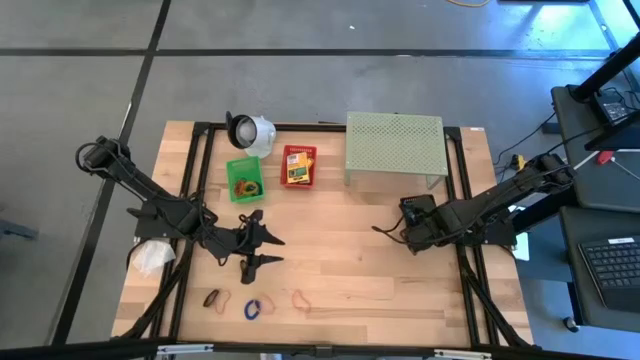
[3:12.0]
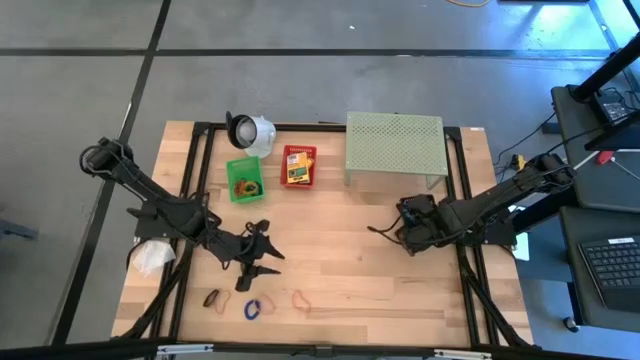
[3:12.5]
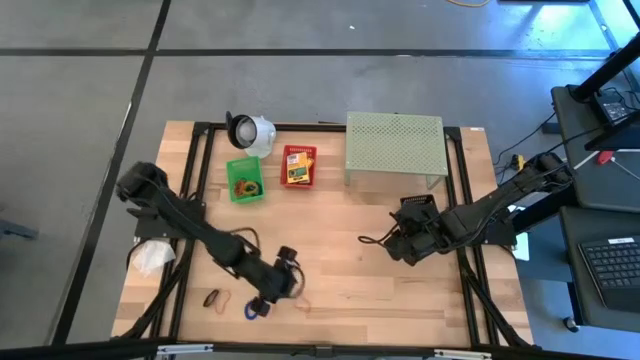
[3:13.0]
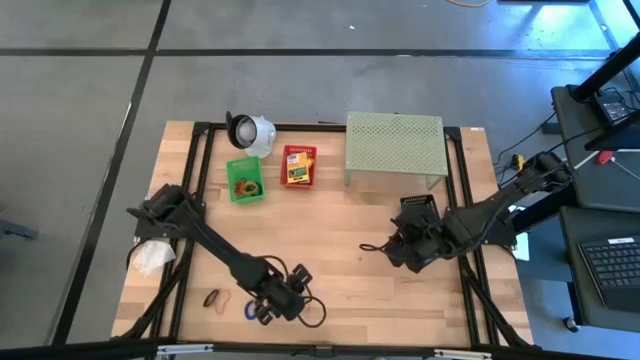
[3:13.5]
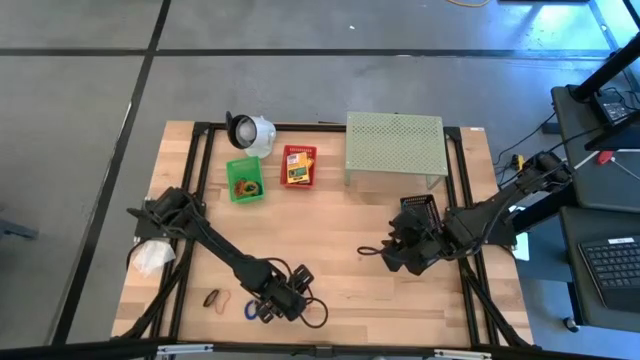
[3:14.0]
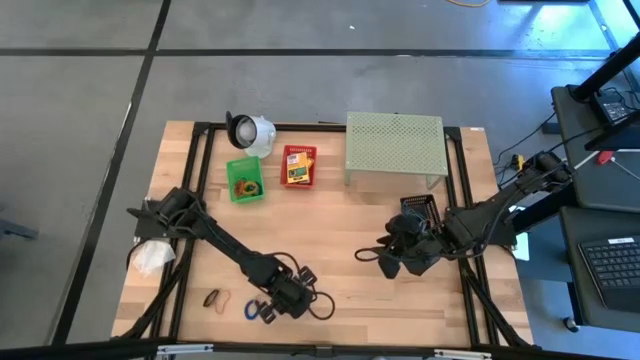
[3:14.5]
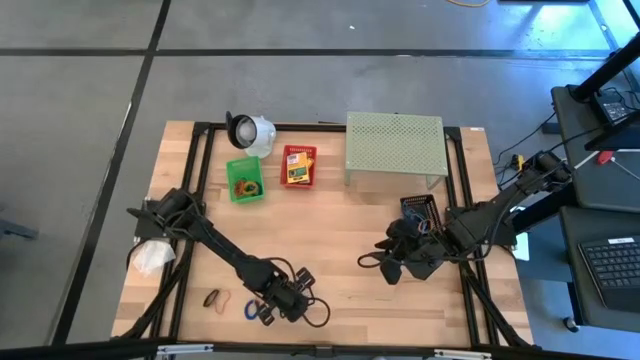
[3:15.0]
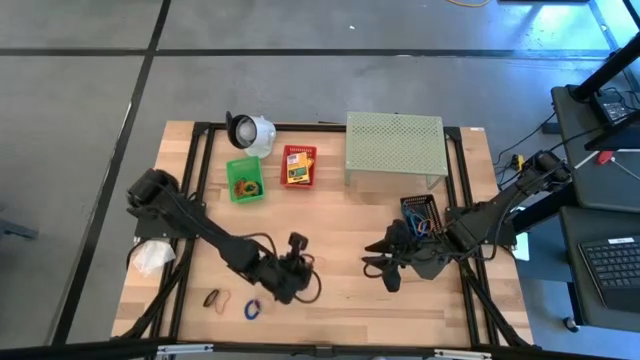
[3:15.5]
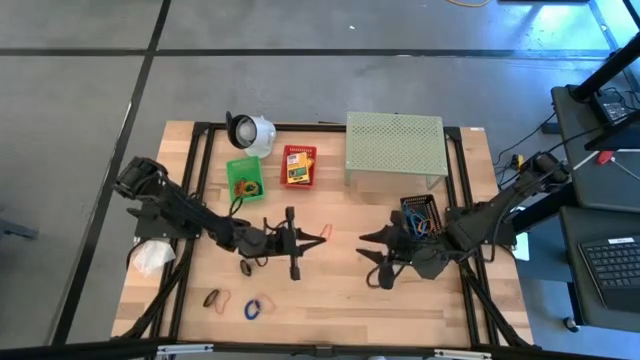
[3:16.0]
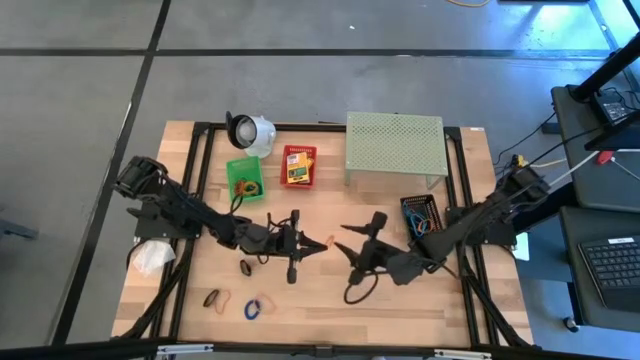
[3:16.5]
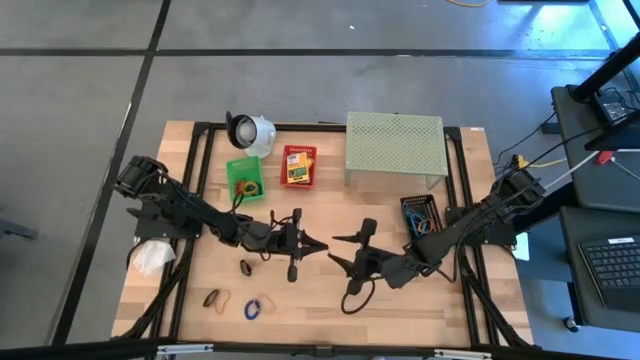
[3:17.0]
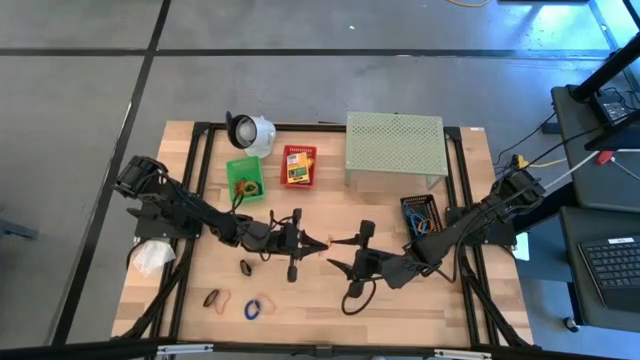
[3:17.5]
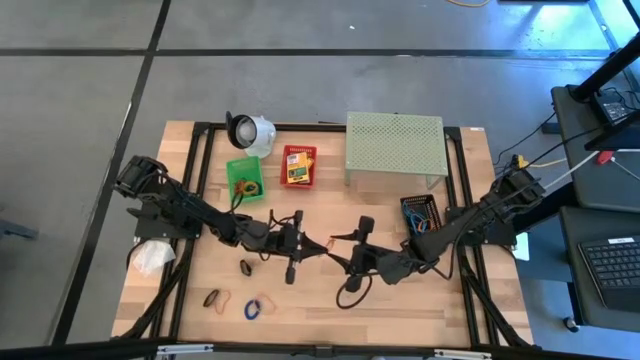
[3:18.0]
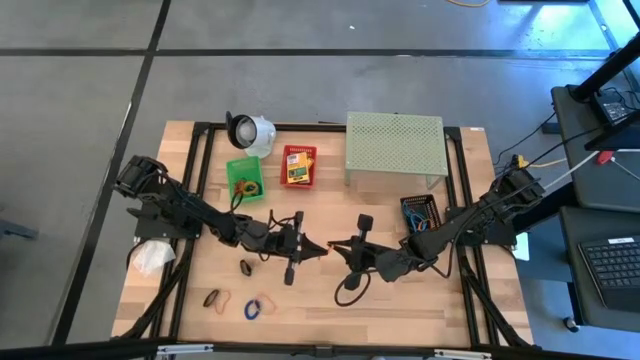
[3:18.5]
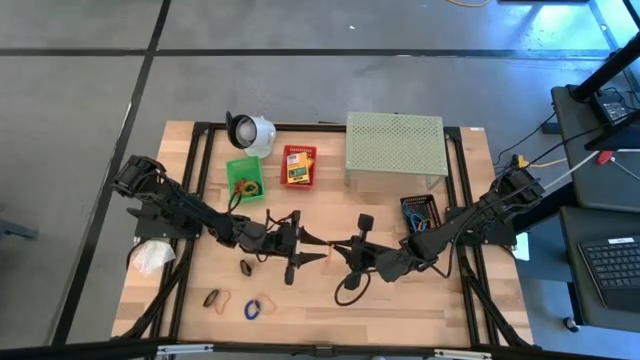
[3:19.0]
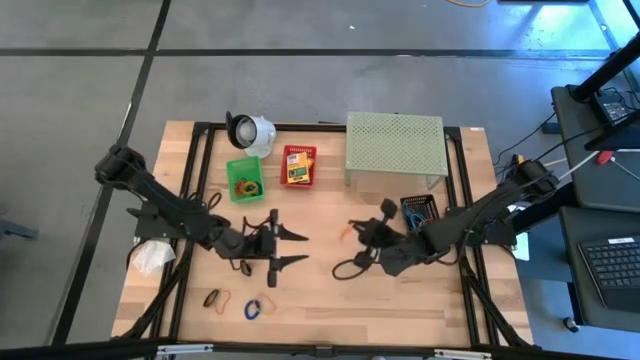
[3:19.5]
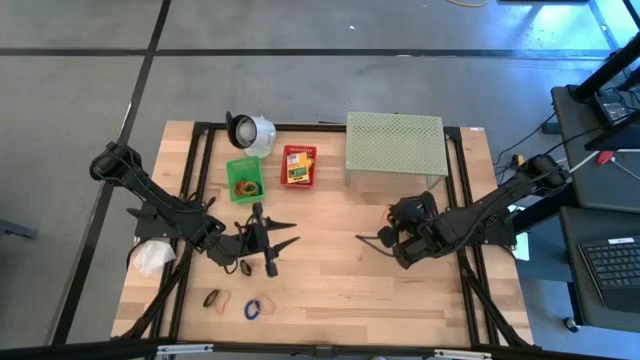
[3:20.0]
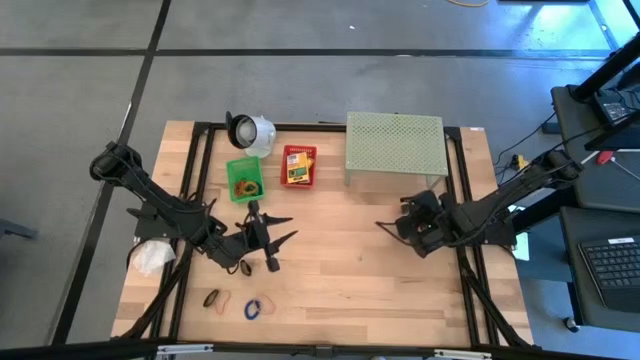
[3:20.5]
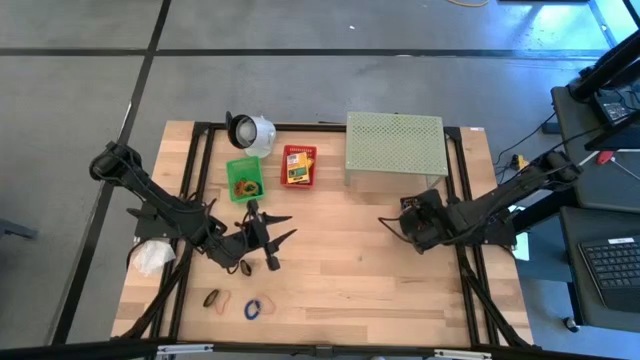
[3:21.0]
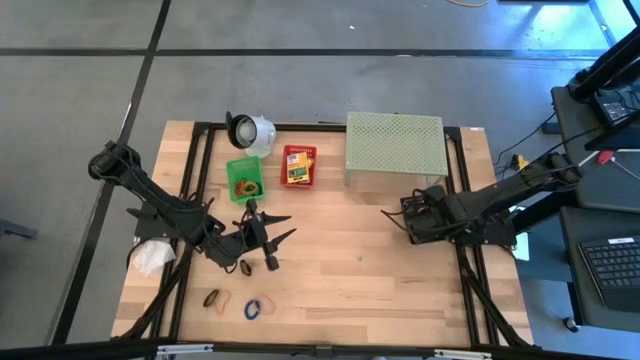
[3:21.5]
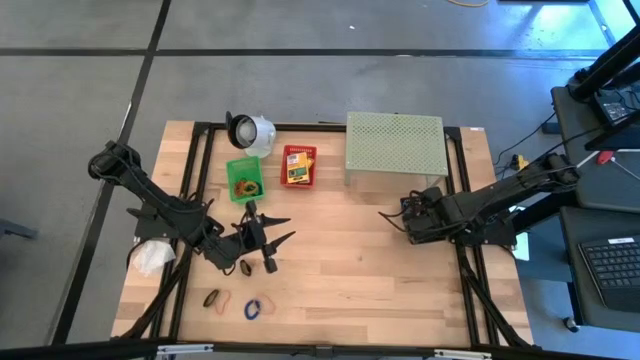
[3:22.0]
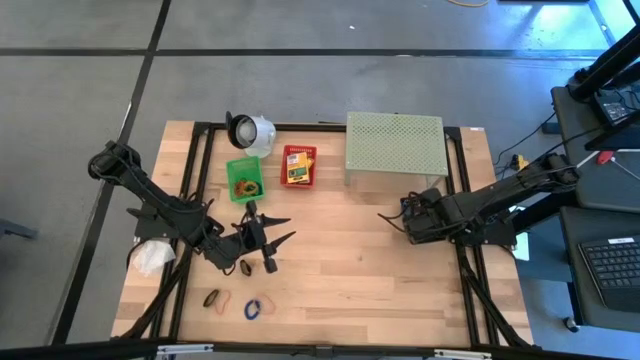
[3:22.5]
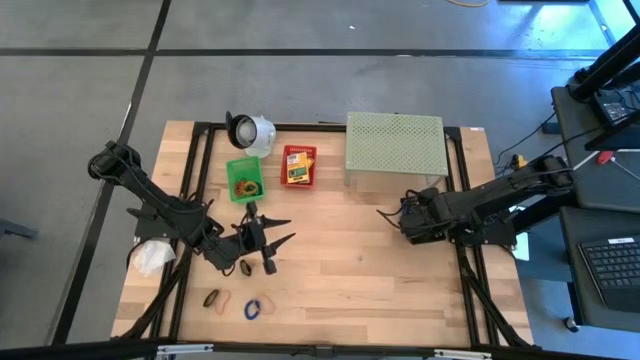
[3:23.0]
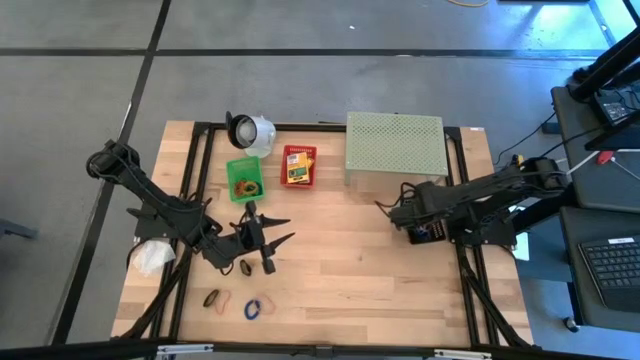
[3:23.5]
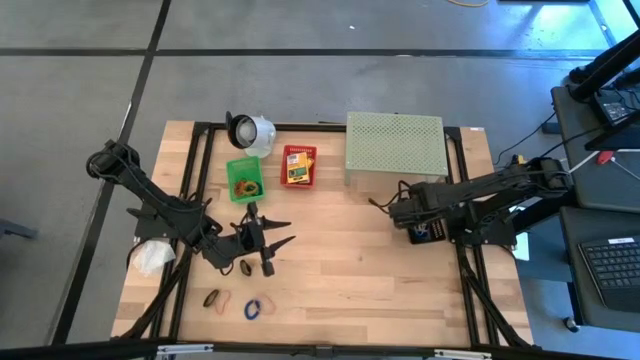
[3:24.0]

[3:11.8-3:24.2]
Task: Pick & Place Office Desk Supplies
Put the orange rubber band into the black basket

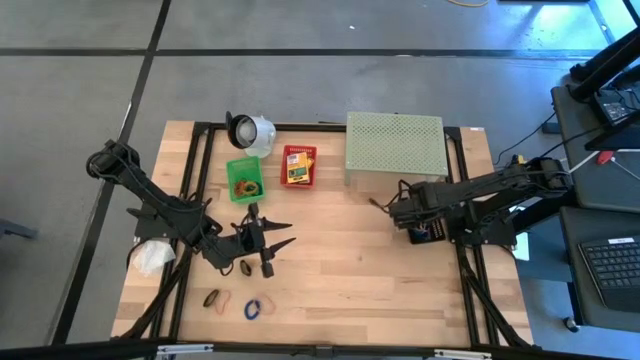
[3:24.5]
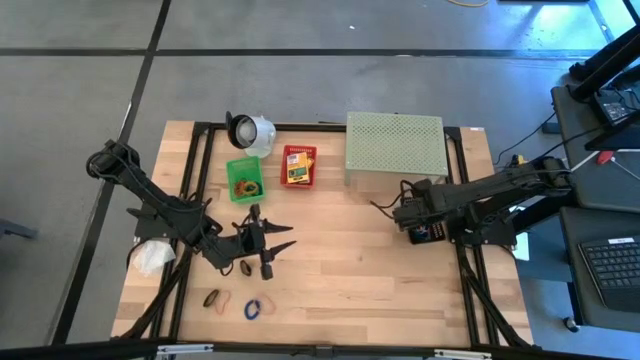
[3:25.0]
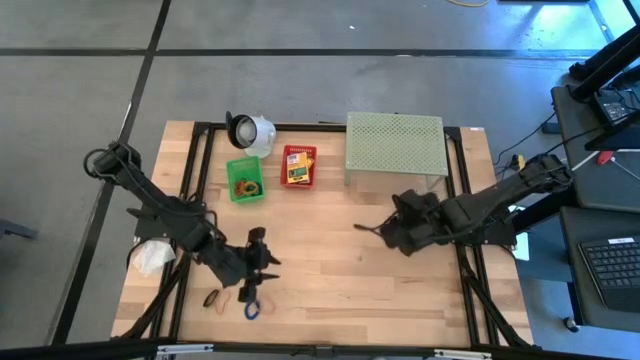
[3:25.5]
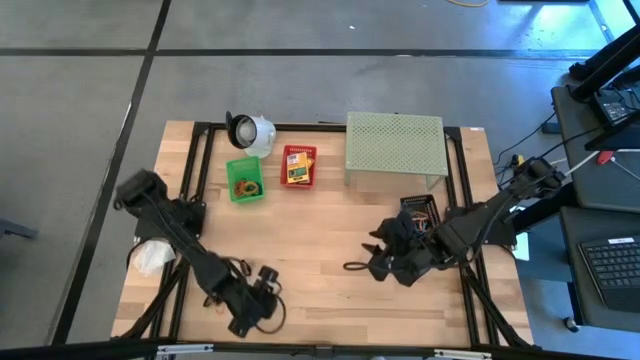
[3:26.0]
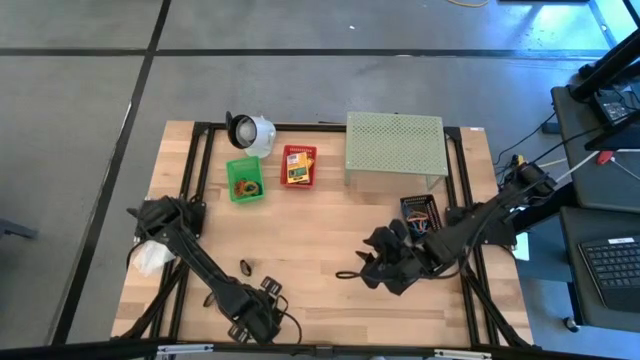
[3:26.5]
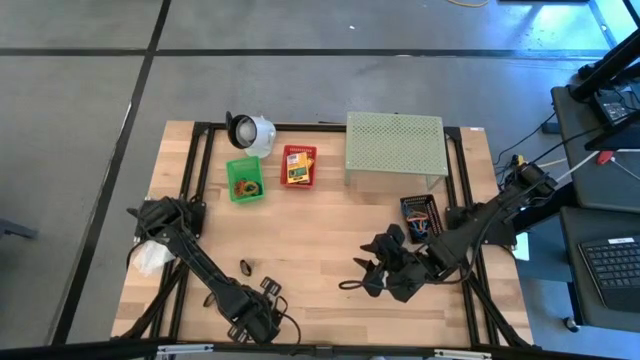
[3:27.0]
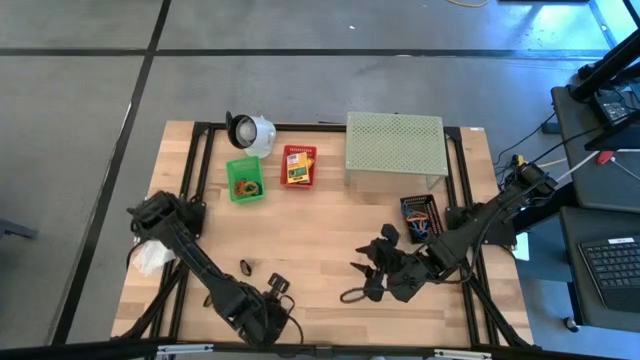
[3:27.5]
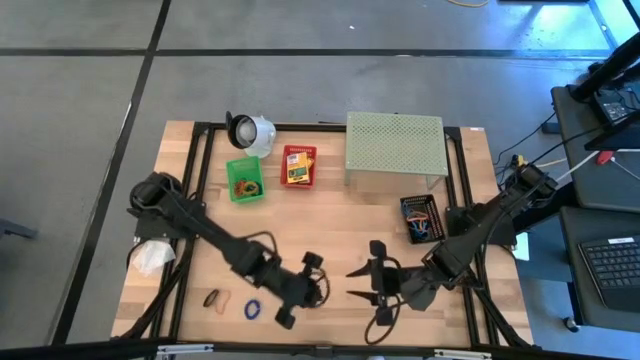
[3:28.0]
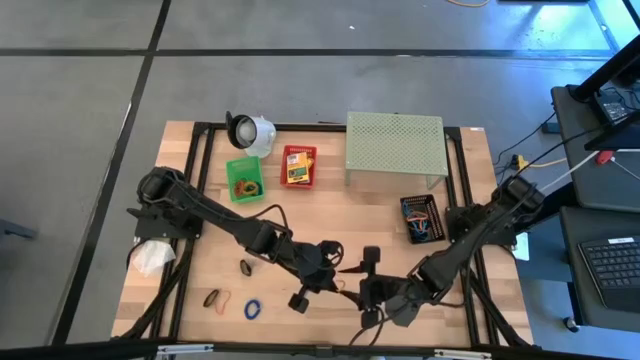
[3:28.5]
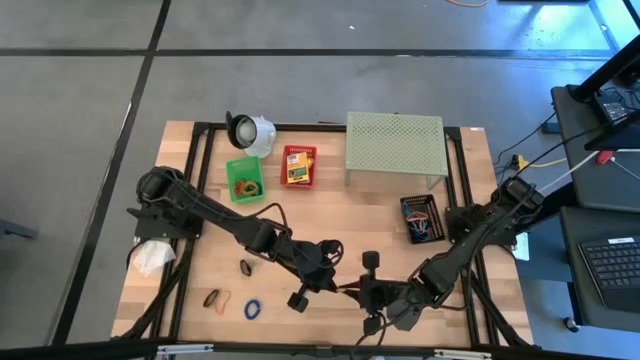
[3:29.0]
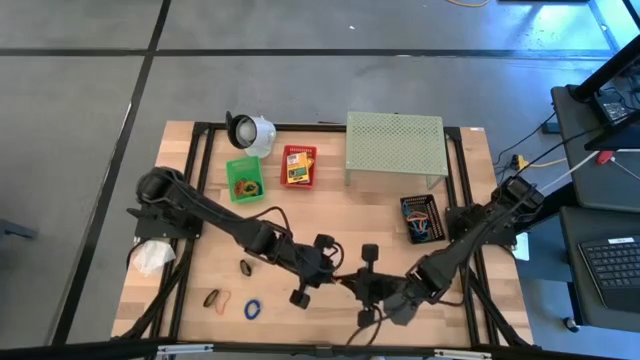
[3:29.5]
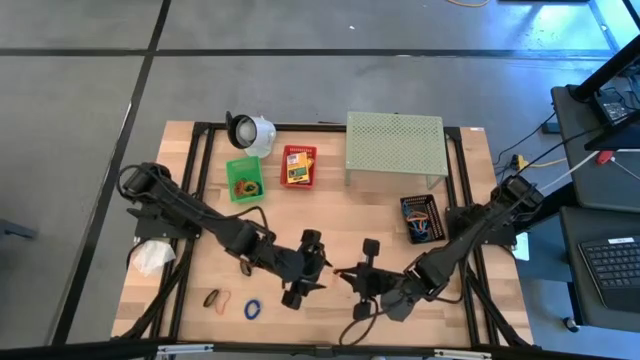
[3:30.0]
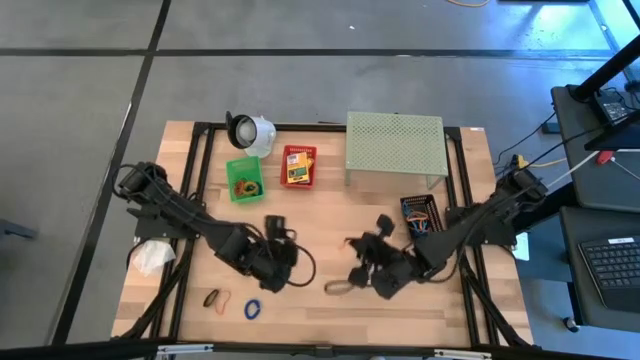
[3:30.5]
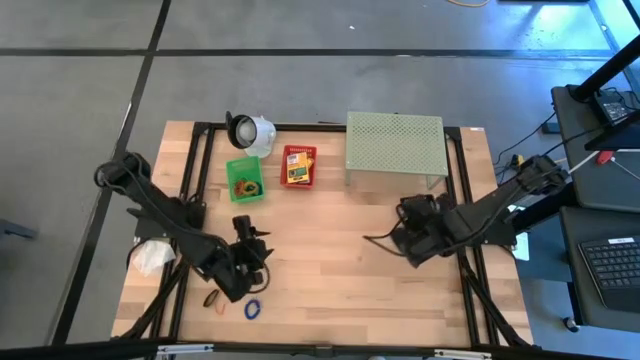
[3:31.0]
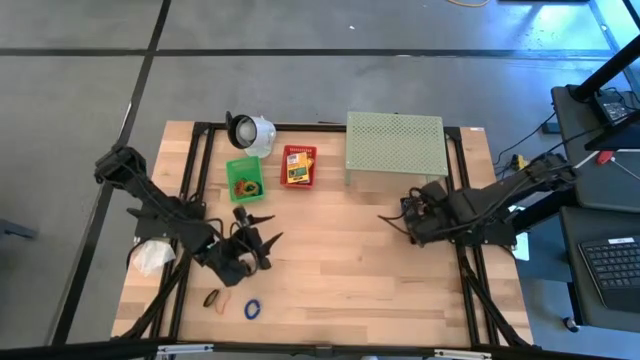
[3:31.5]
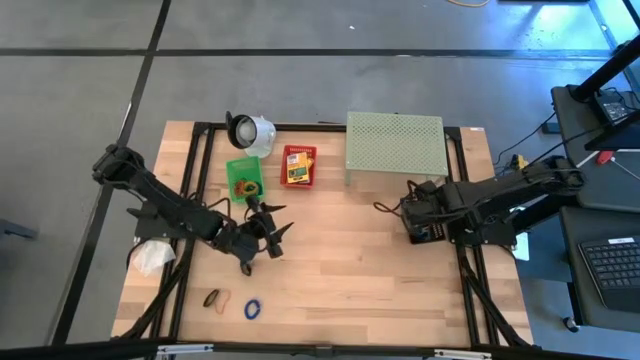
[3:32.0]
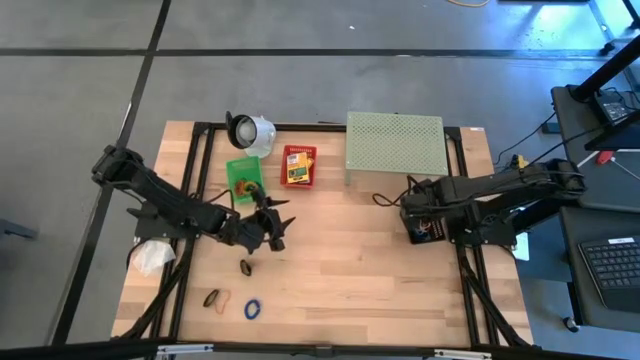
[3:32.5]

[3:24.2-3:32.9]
Put the orange rubber band into the black basket
